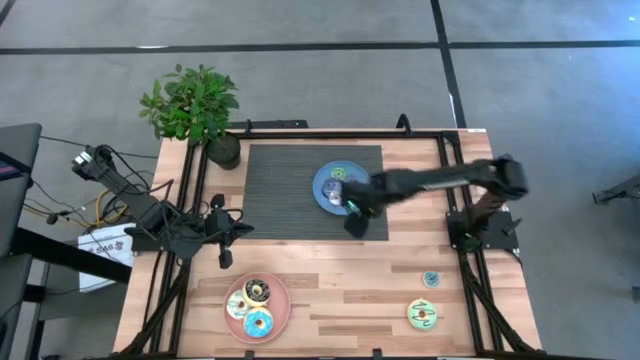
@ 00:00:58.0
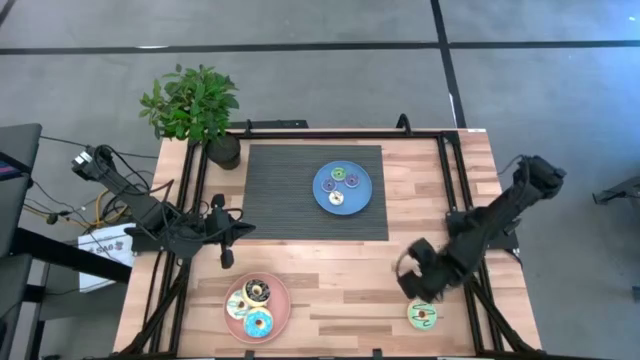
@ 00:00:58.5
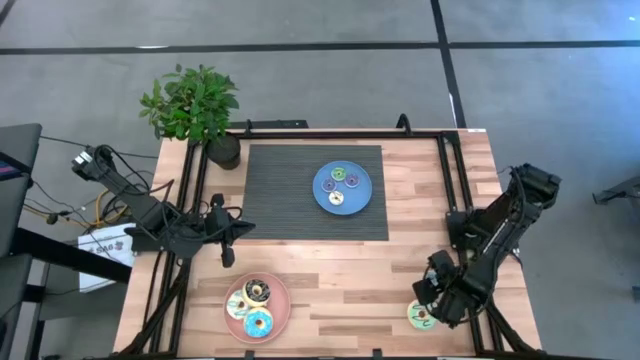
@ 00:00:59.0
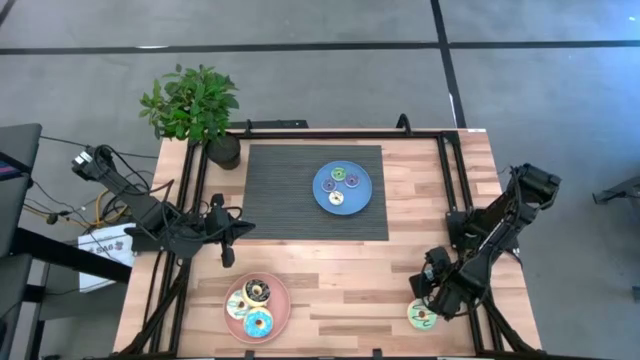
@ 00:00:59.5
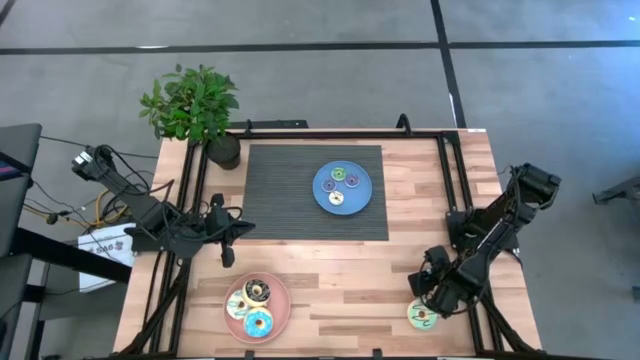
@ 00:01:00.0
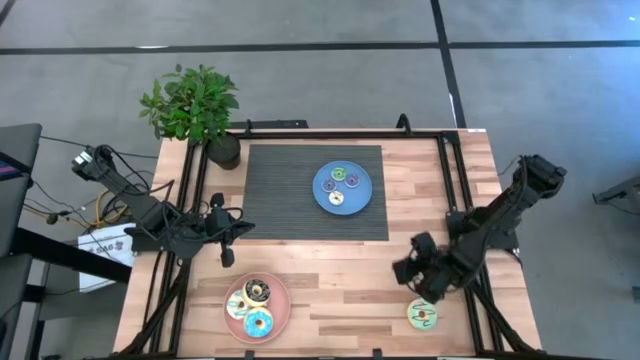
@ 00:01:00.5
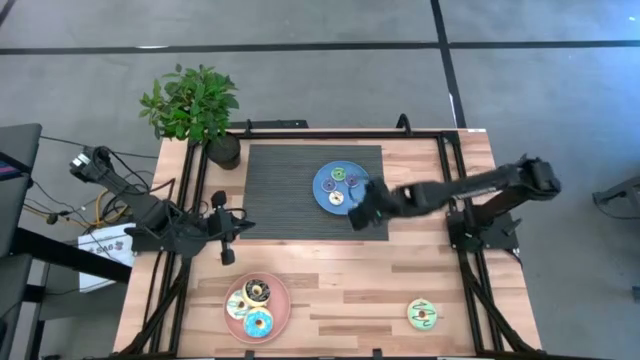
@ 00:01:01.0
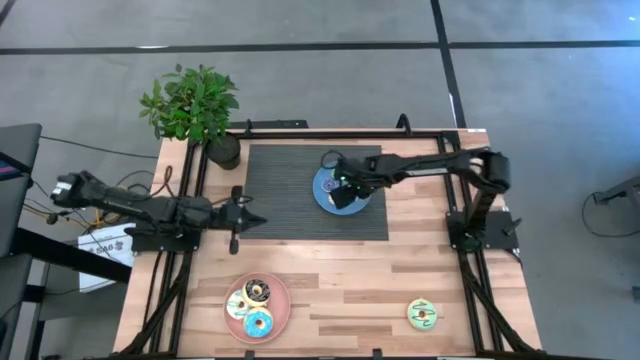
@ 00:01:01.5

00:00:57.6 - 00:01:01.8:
Task: Pick & Place donuts
Put the small blue donut on the light orange plate

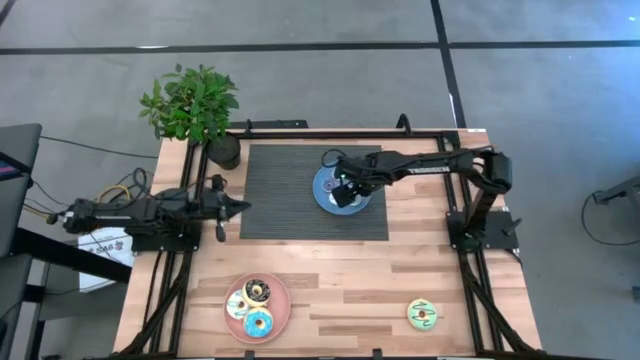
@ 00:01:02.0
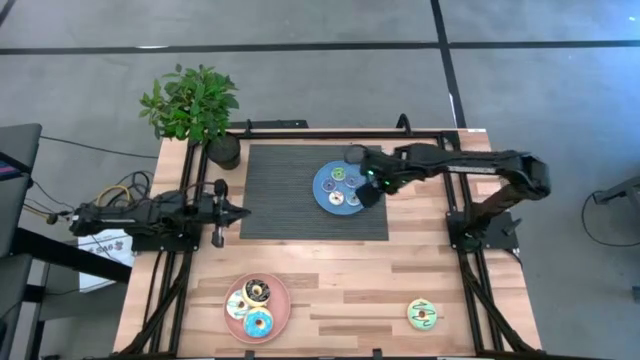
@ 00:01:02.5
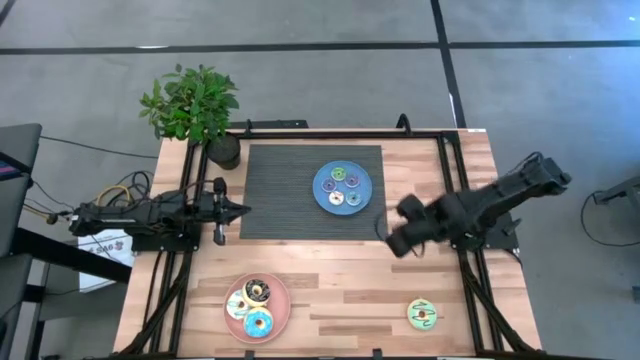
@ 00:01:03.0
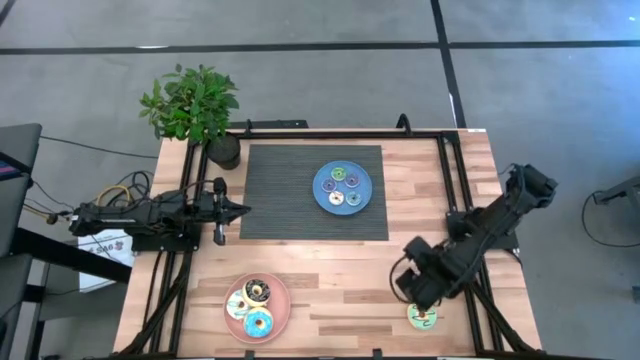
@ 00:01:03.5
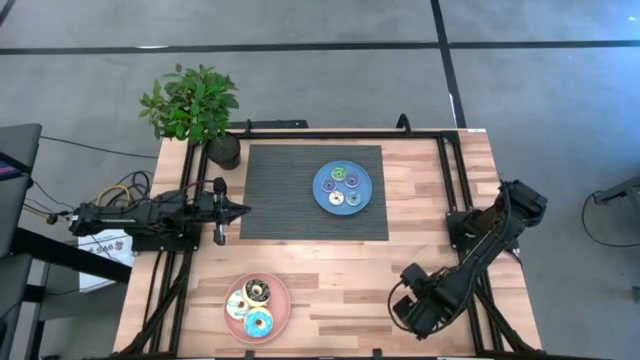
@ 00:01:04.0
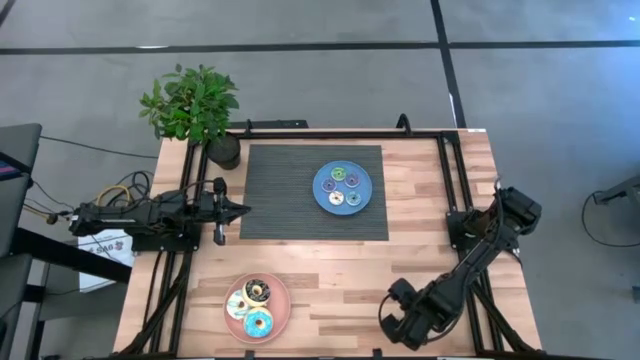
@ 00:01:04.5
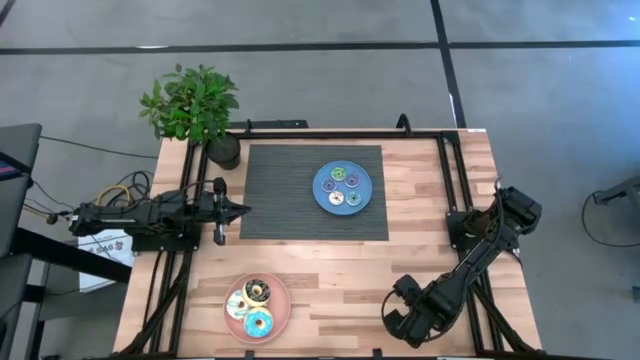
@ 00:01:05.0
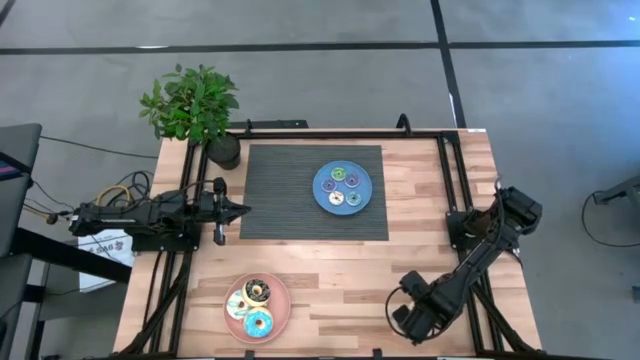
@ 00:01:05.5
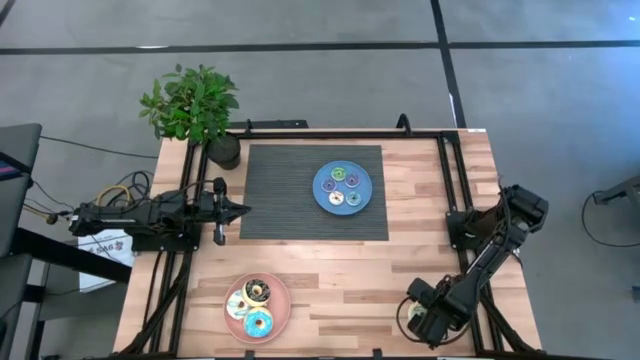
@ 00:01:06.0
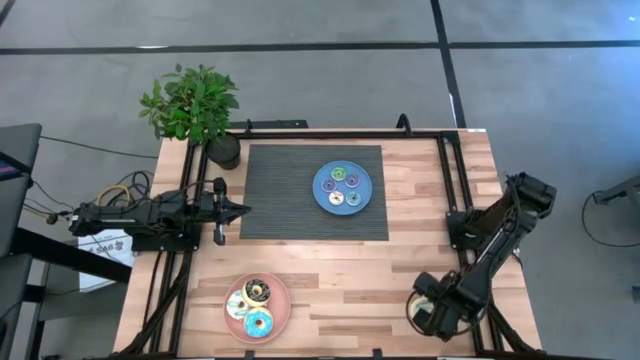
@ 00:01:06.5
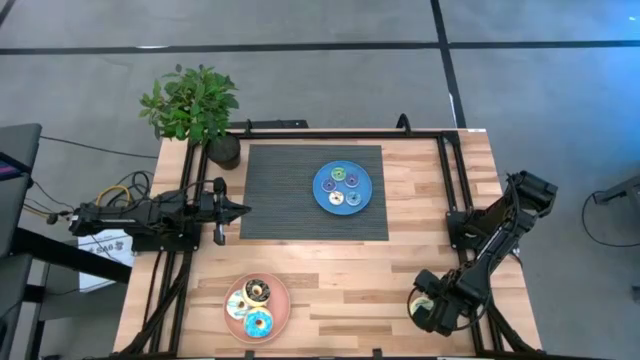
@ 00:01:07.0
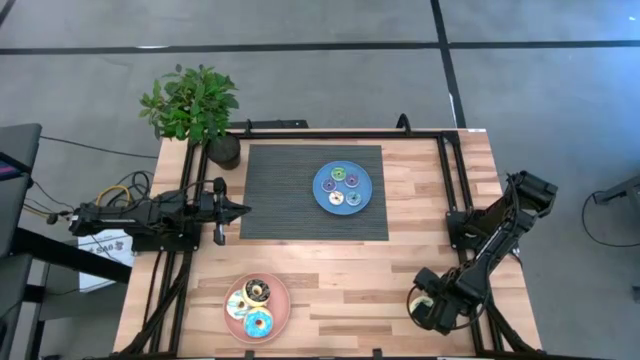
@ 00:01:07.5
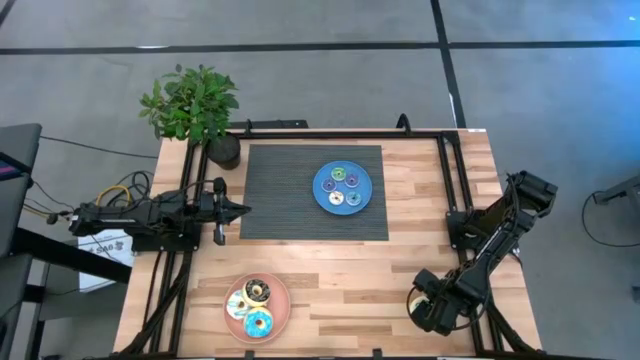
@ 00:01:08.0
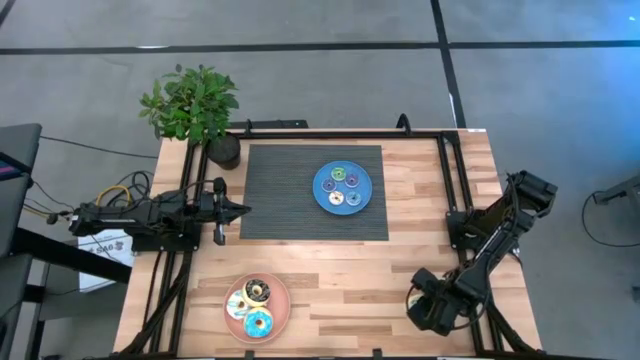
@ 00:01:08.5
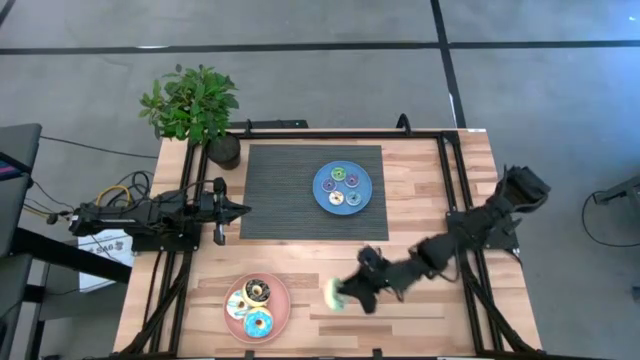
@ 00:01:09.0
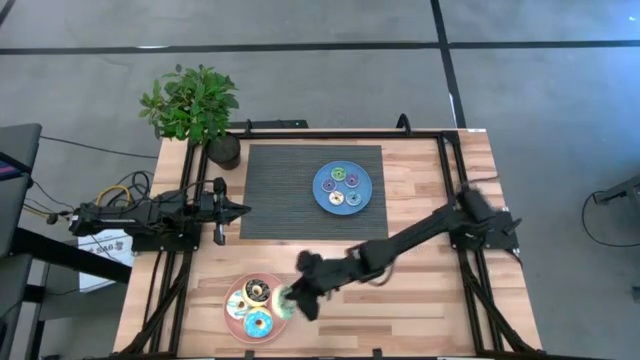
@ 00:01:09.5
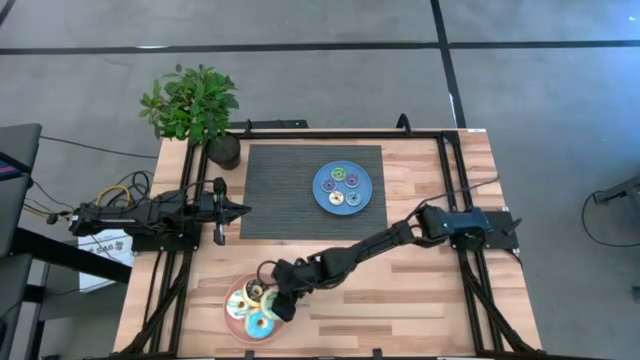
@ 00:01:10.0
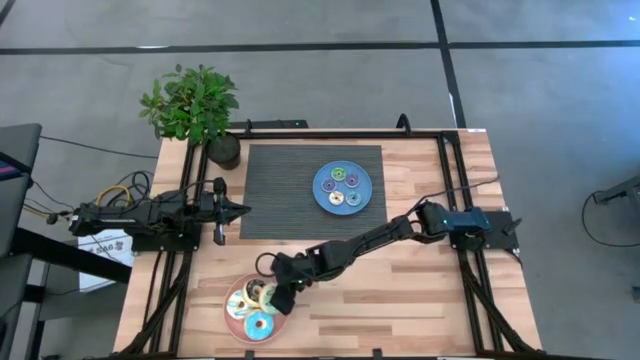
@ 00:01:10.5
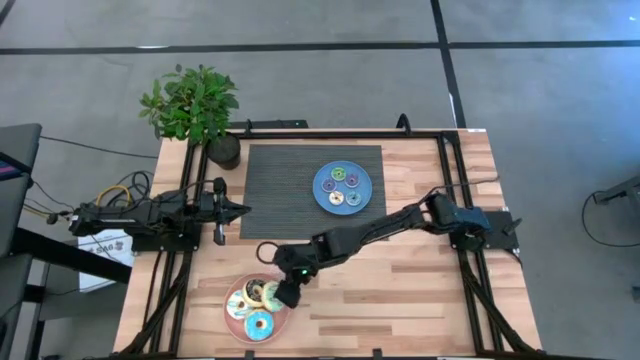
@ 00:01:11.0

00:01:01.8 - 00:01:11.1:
Put the big light green donut on the plate

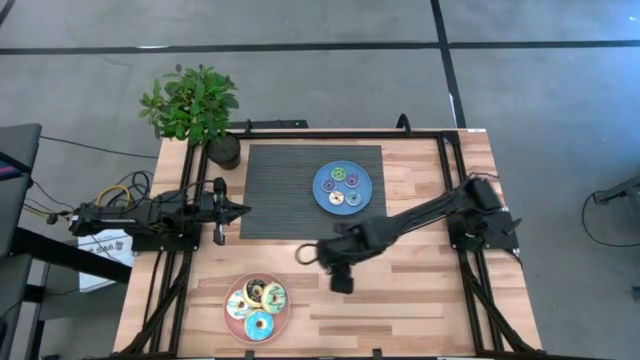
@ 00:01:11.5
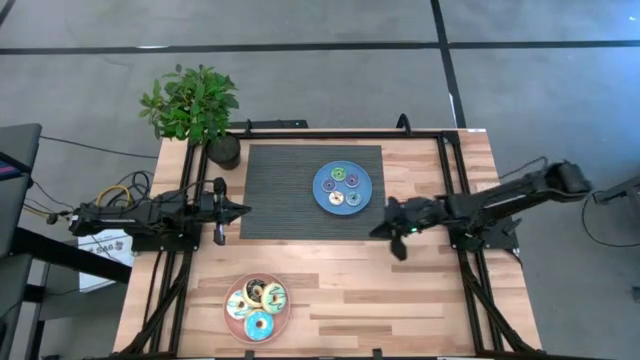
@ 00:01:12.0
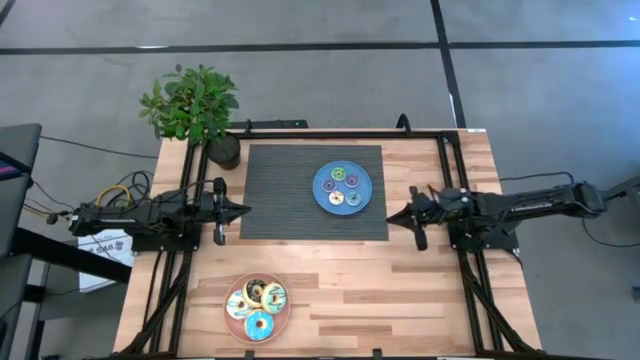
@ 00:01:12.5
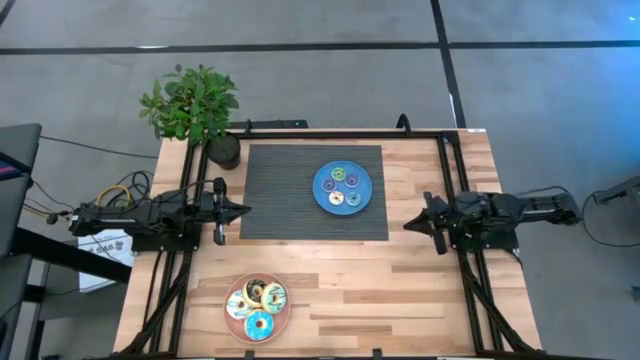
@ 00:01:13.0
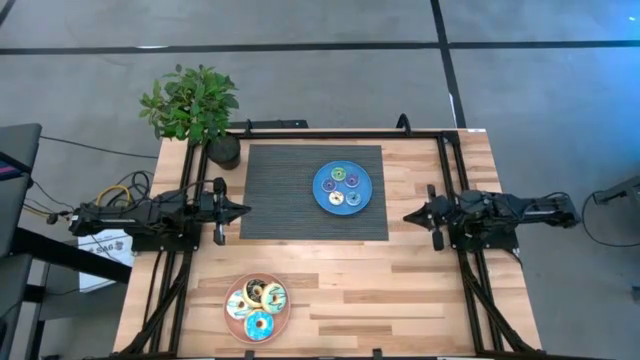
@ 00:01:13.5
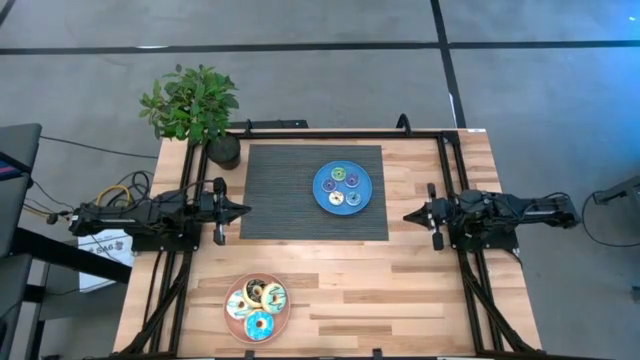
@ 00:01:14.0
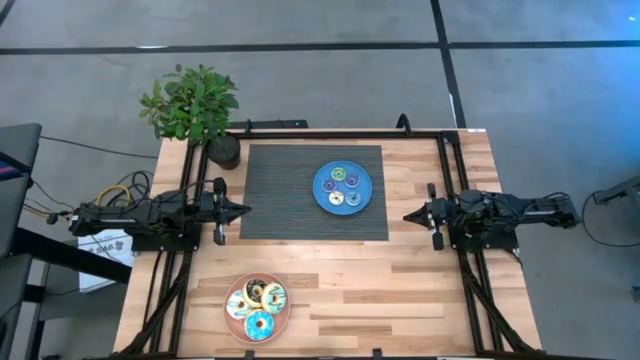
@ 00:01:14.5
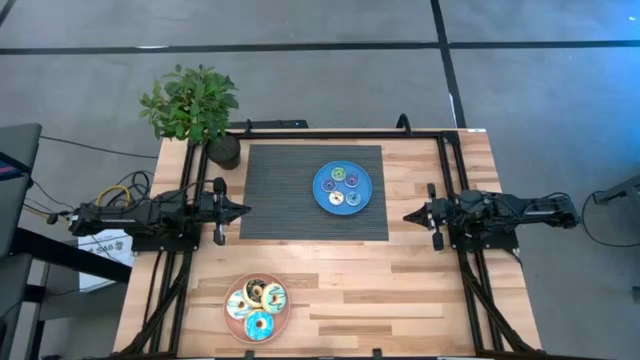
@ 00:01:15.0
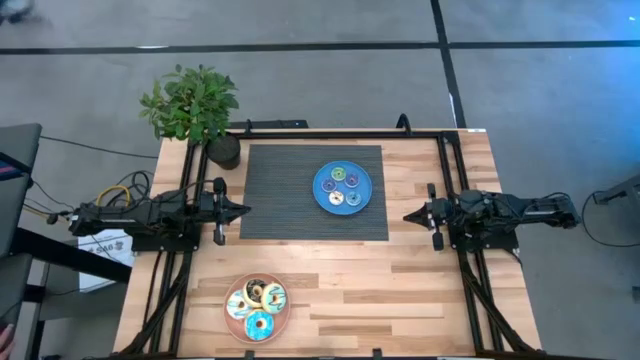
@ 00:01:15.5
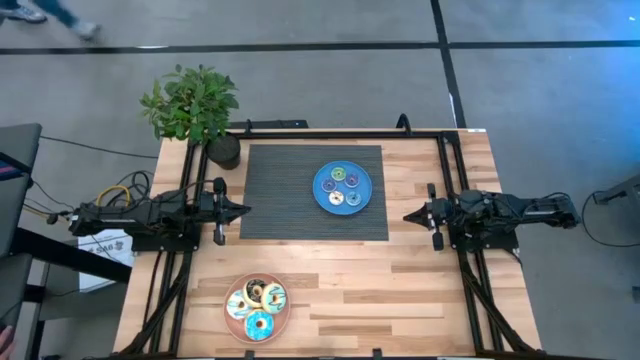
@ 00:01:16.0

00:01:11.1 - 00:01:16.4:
Return to Home Position
